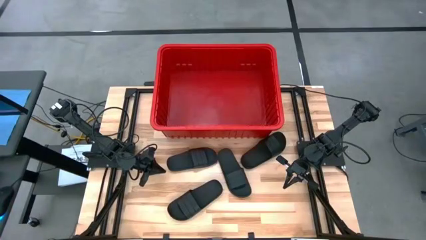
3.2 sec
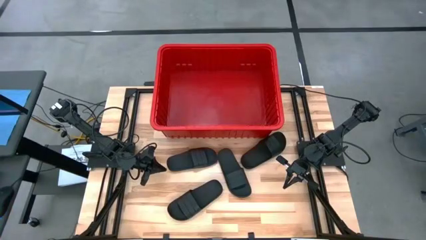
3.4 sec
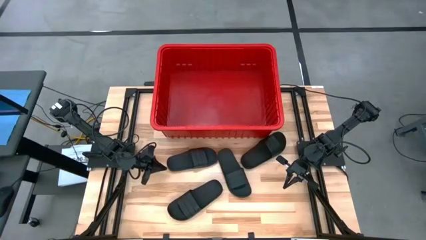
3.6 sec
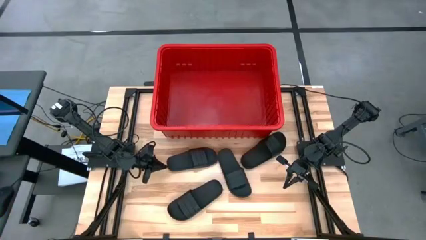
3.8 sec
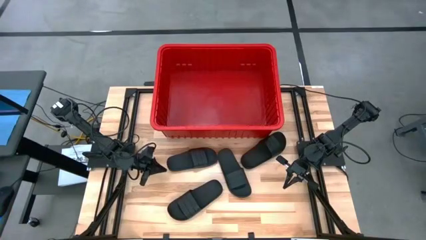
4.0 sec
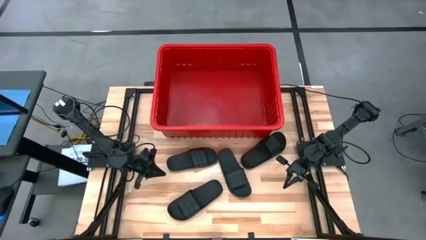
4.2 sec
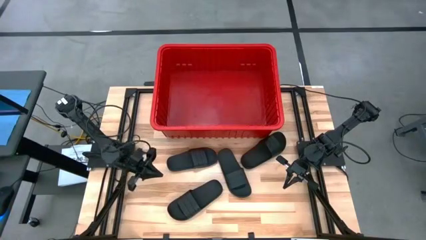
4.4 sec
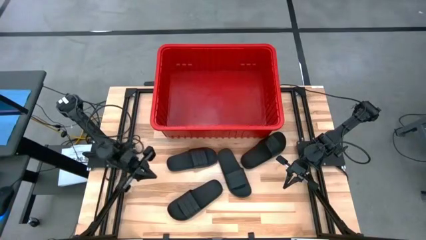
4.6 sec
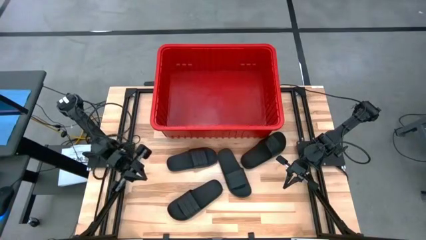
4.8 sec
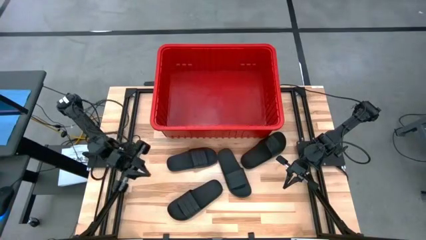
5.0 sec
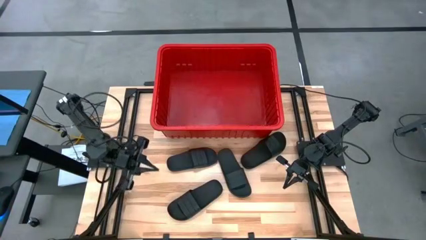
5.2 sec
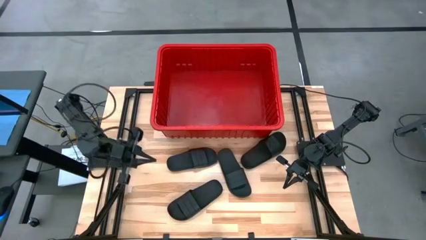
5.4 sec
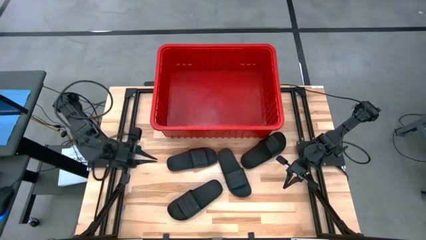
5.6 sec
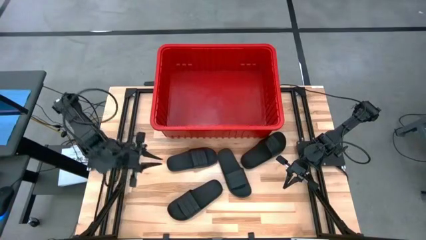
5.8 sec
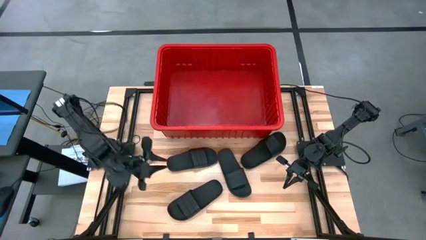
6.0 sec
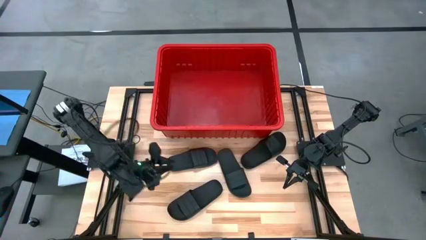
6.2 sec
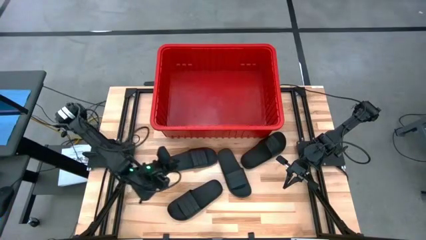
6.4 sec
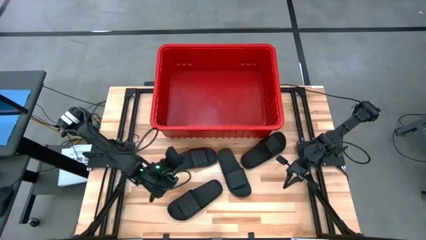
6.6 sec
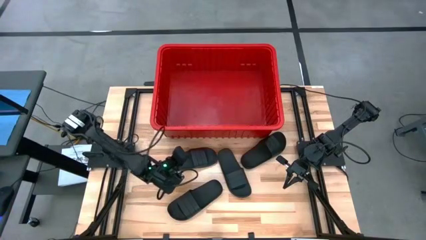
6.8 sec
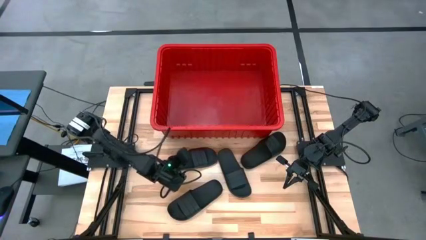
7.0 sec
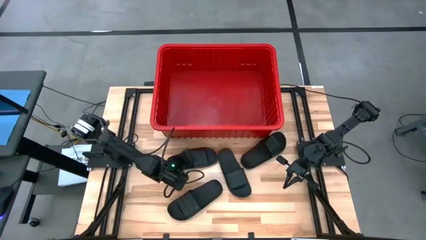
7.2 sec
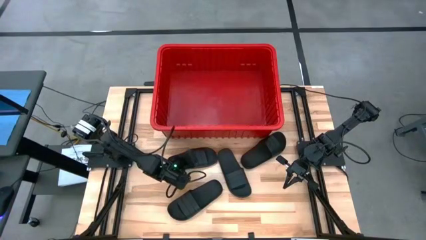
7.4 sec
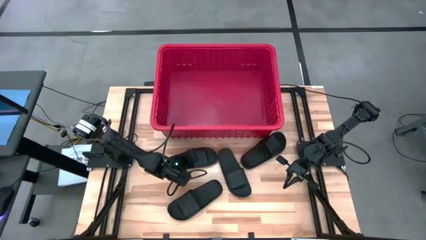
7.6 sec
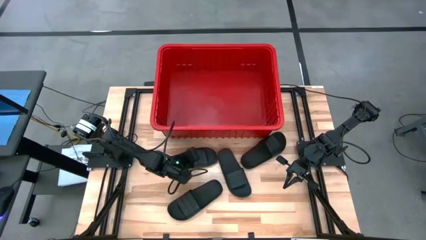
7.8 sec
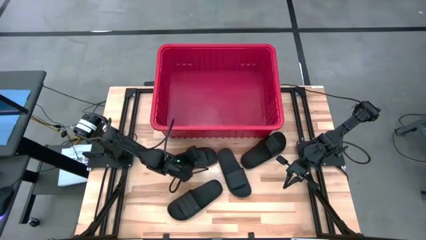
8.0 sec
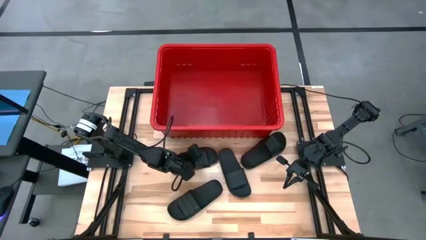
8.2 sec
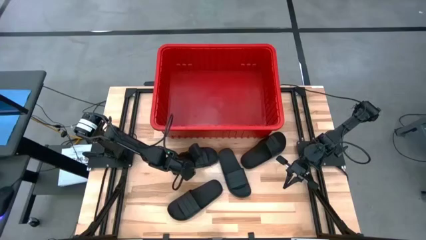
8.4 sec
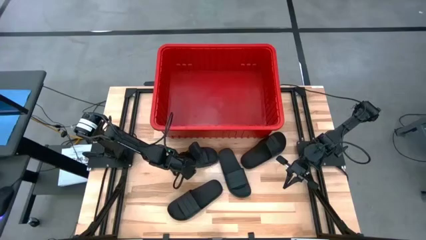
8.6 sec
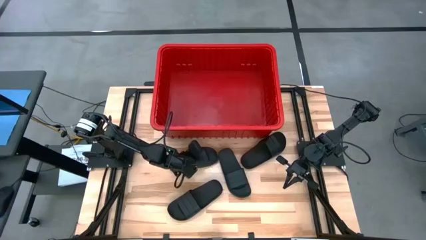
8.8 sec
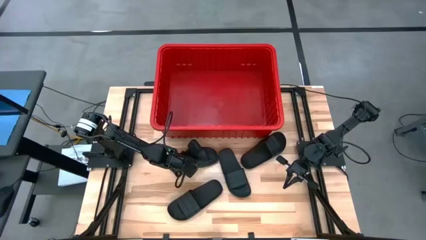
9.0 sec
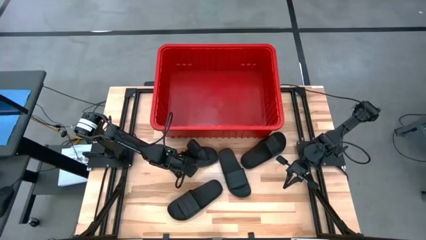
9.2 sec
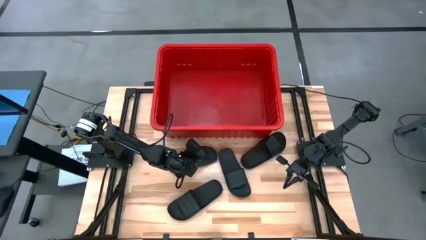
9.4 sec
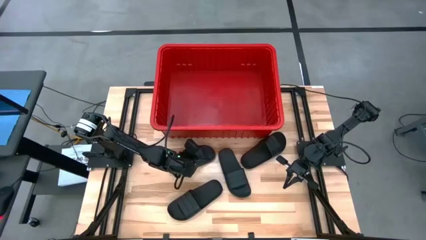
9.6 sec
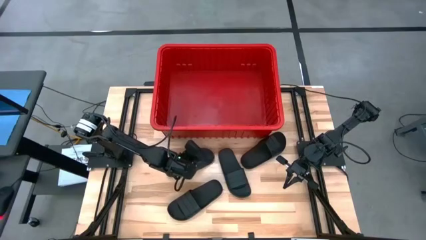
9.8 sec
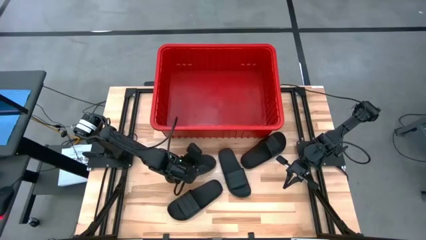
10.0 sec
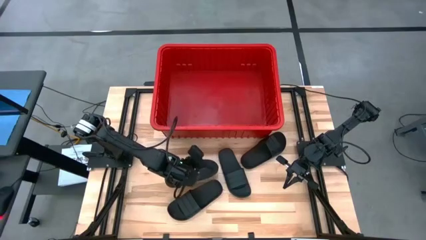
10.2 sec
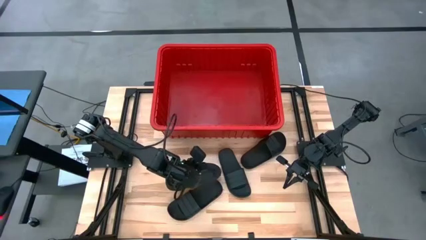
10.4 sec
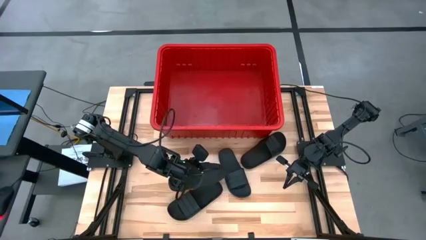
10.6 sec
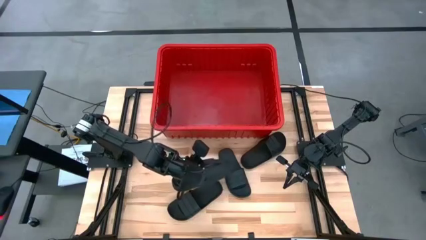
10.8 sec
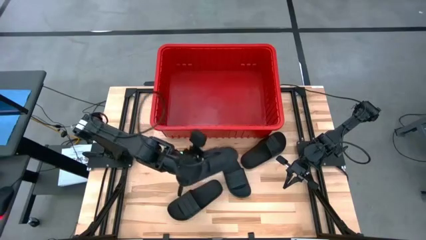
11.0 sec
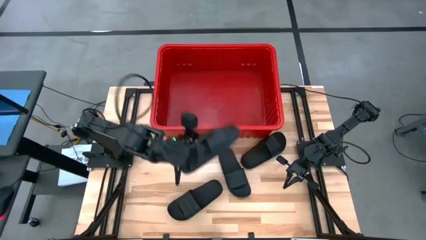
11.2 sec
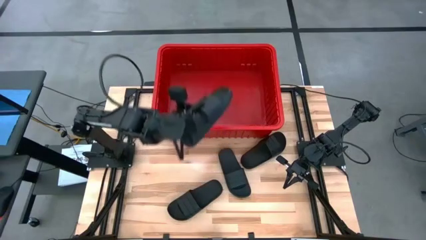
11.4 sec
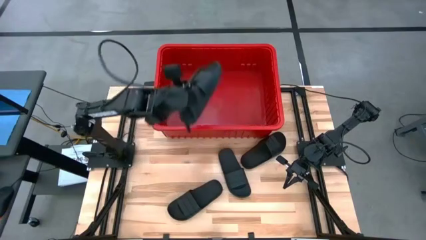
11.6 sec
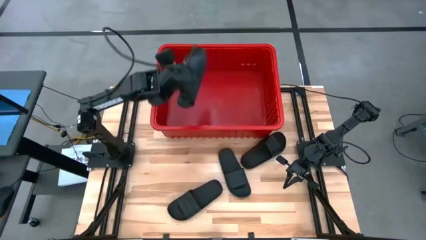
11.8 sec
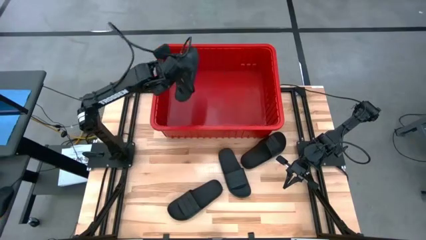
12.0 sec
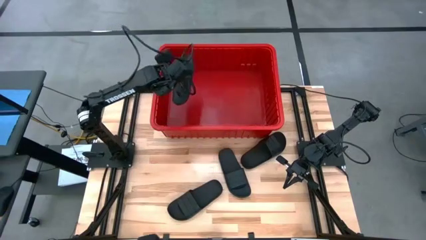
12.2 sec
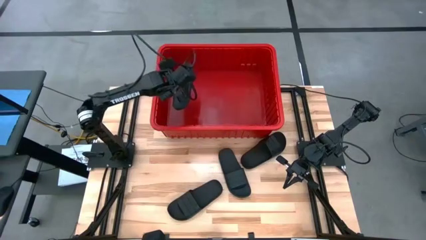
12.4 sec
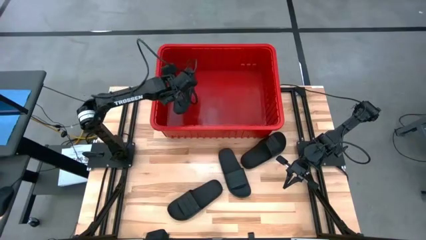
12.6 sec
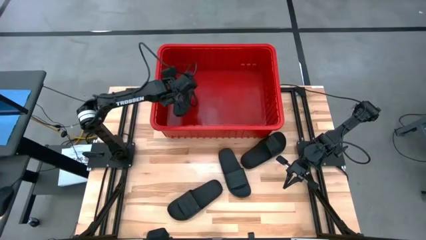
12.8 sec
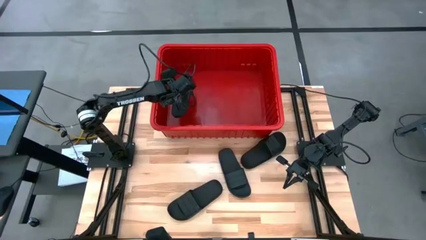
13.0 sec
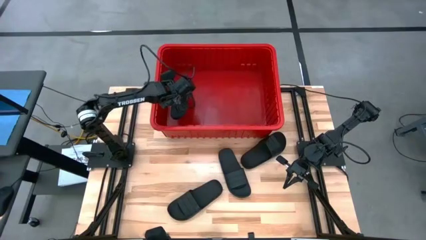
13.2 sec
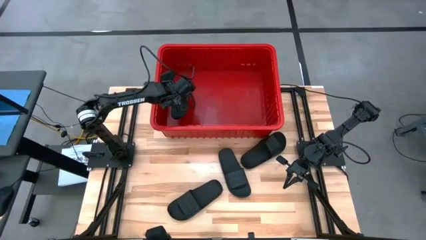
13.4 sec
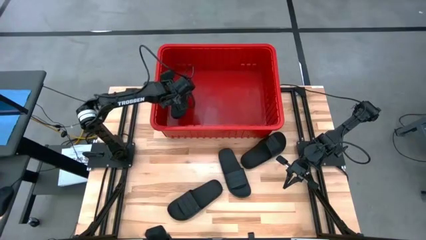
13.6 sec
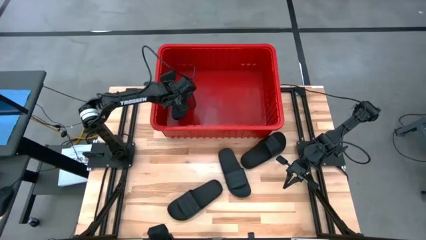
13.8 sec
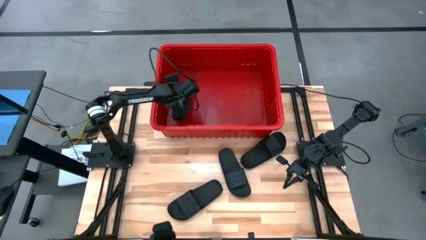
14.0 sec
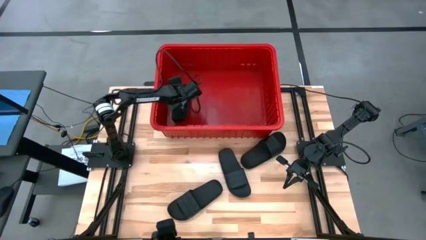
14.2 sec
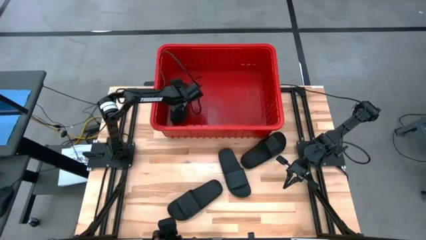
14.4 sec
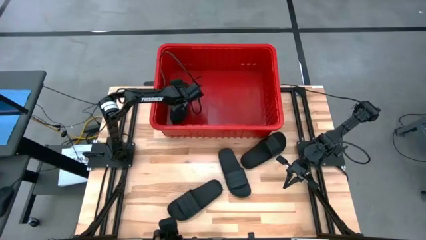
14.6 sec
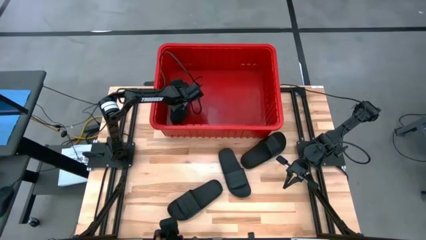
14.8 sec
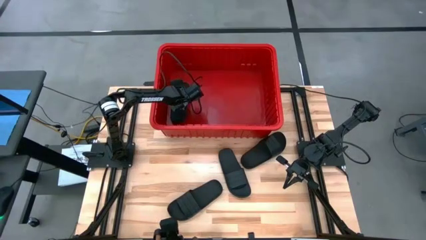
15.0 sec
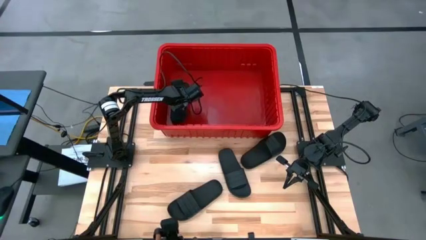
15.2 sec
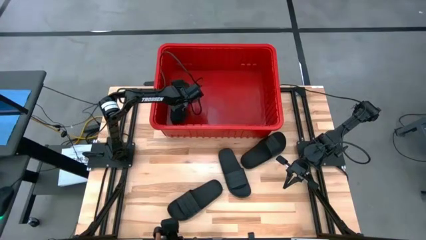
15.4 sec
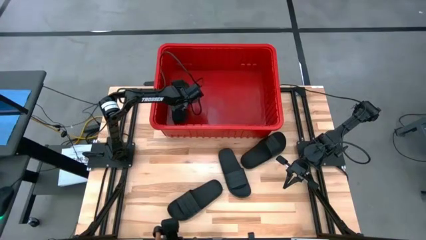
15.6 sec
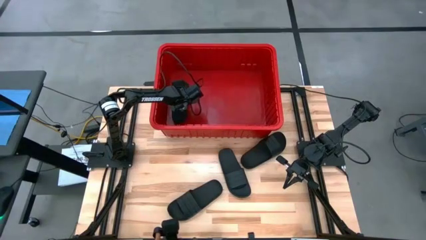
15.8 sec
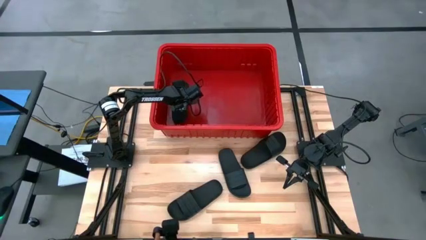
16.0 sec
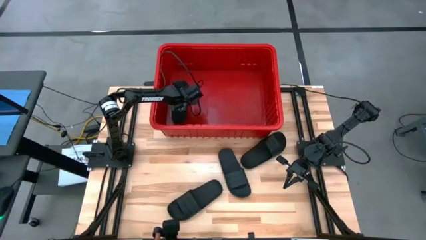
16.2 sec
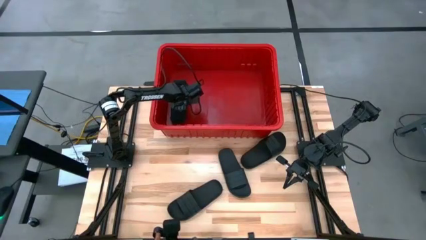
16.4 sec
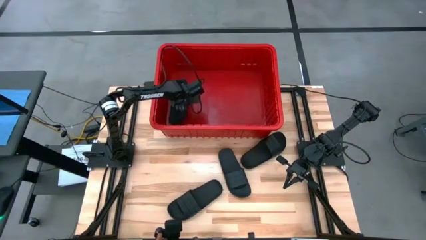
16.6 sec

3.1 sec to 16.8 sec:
Task: Pick and place slides into bin
Put the slide into the bin
